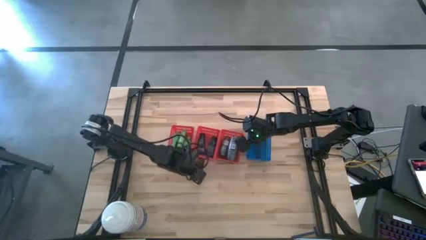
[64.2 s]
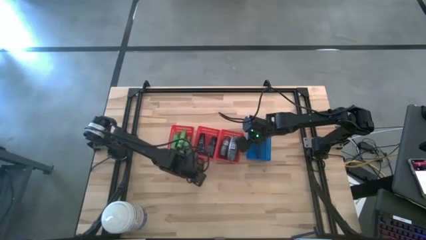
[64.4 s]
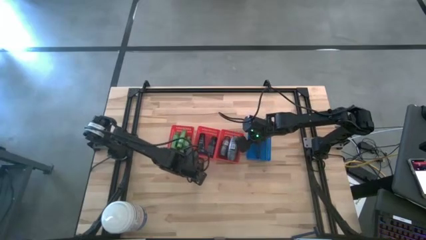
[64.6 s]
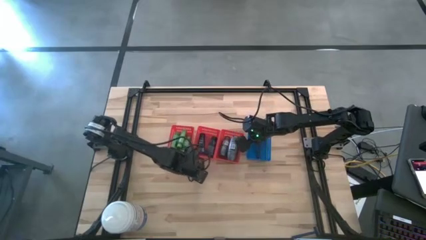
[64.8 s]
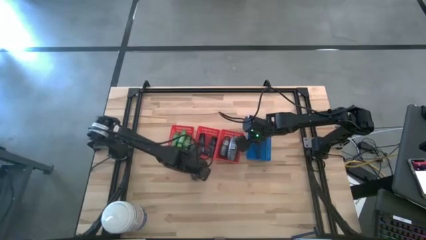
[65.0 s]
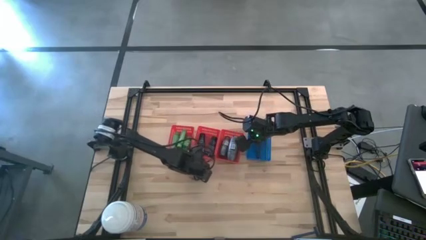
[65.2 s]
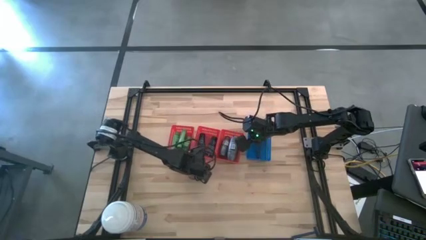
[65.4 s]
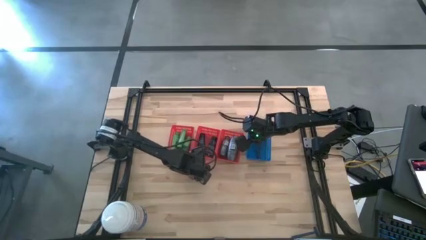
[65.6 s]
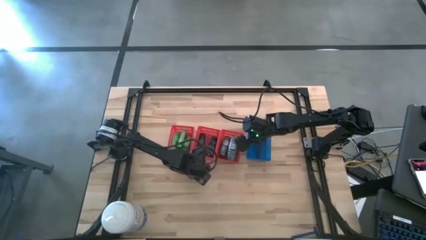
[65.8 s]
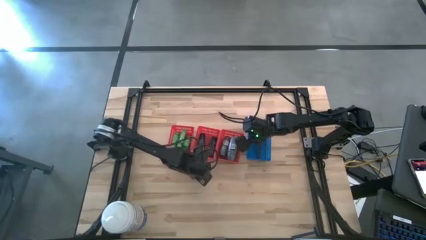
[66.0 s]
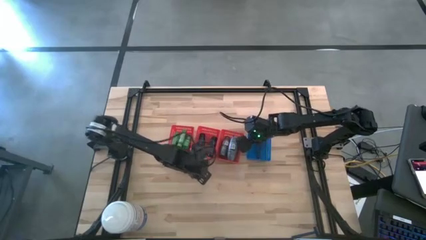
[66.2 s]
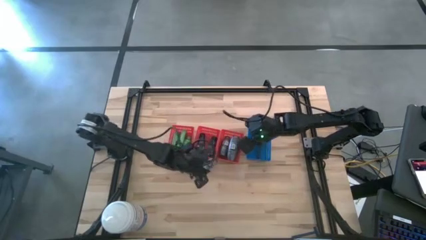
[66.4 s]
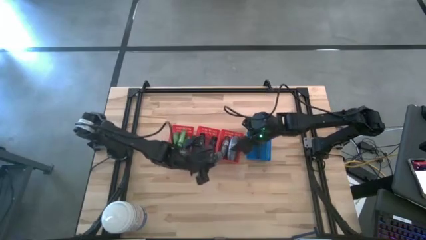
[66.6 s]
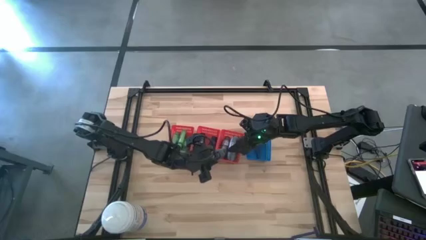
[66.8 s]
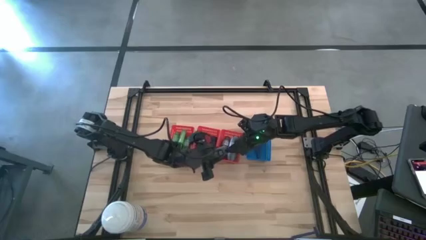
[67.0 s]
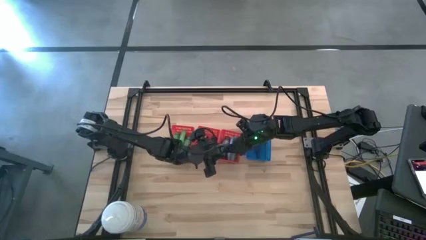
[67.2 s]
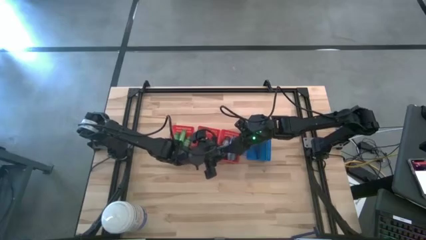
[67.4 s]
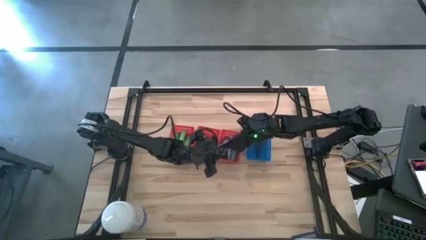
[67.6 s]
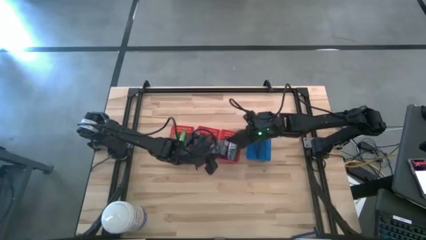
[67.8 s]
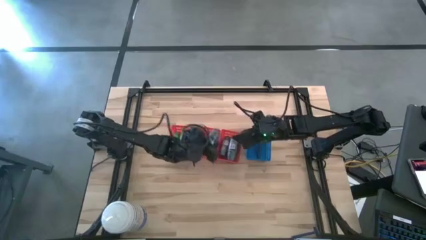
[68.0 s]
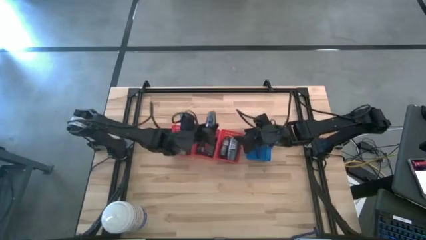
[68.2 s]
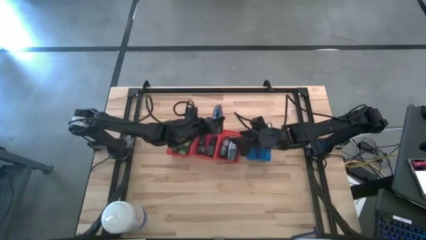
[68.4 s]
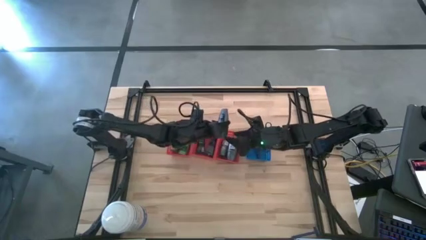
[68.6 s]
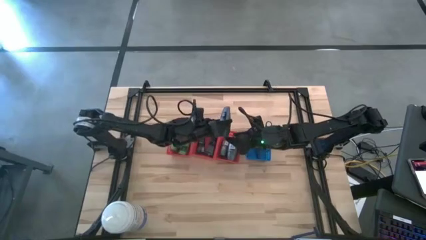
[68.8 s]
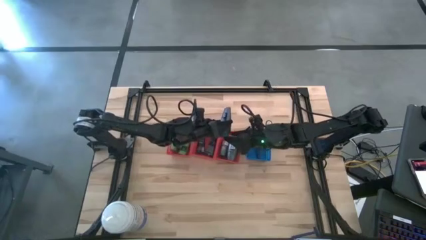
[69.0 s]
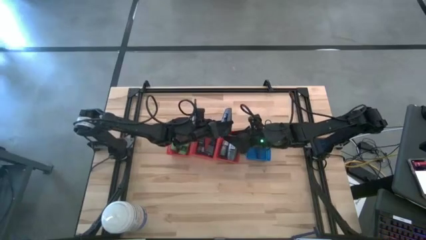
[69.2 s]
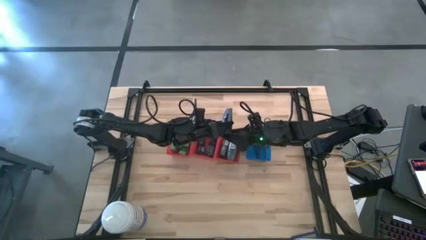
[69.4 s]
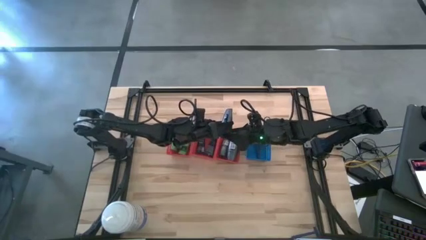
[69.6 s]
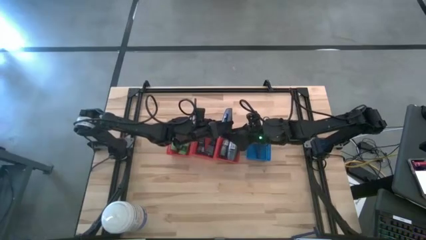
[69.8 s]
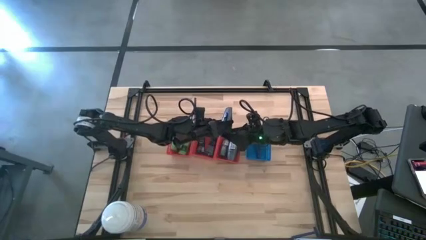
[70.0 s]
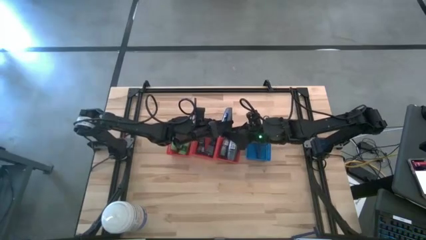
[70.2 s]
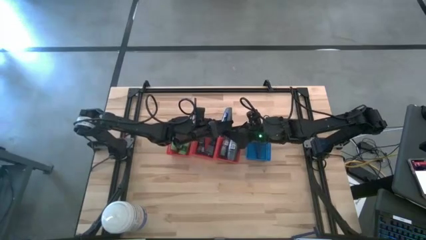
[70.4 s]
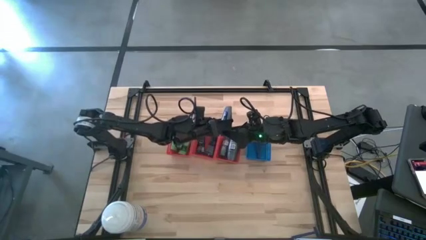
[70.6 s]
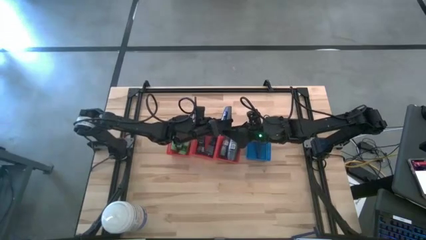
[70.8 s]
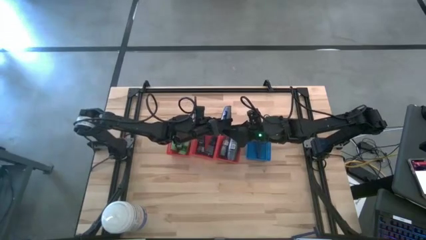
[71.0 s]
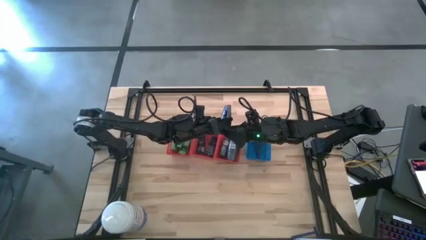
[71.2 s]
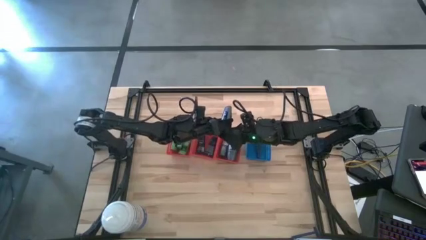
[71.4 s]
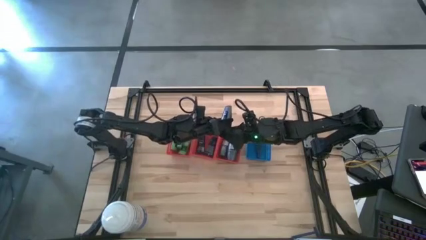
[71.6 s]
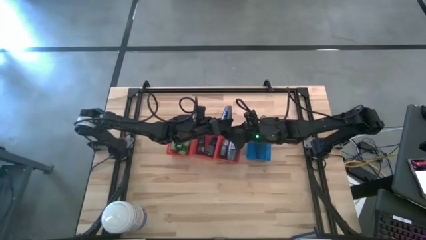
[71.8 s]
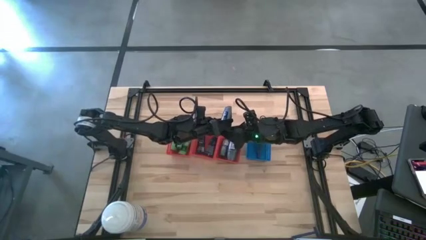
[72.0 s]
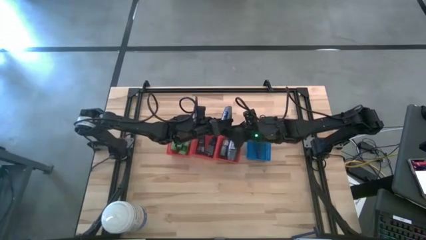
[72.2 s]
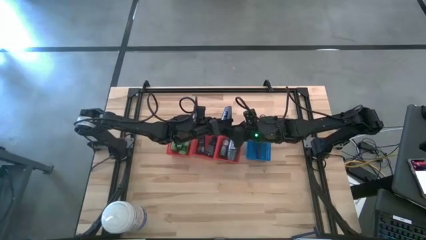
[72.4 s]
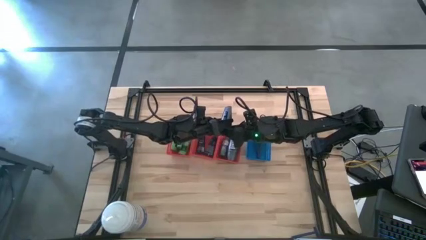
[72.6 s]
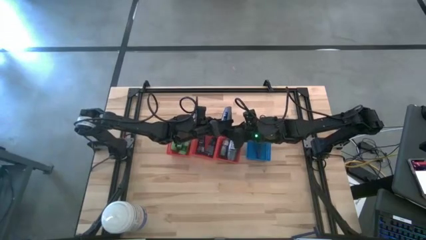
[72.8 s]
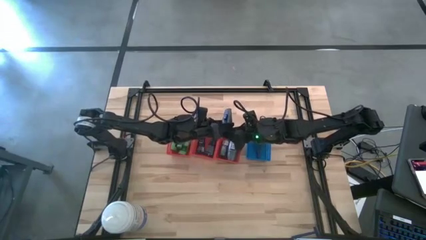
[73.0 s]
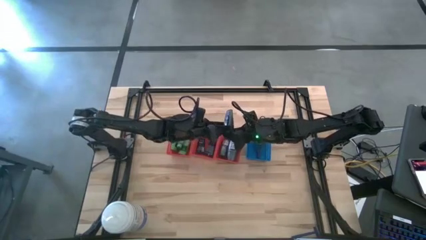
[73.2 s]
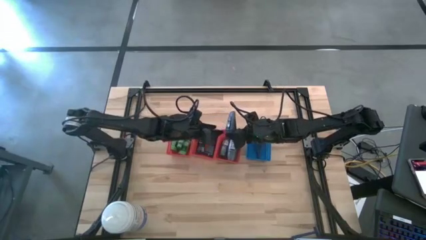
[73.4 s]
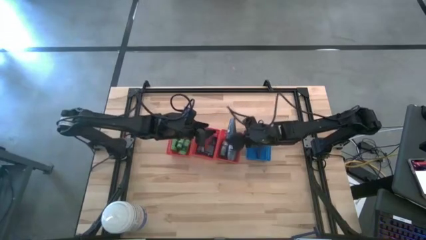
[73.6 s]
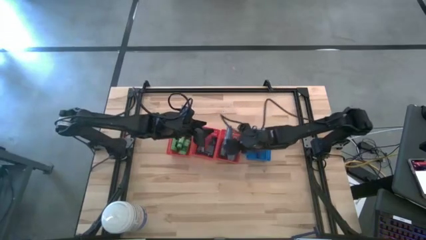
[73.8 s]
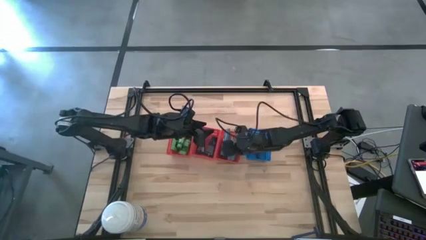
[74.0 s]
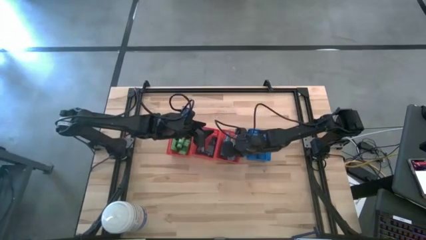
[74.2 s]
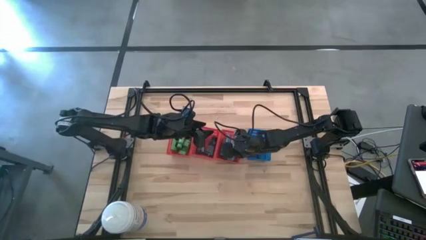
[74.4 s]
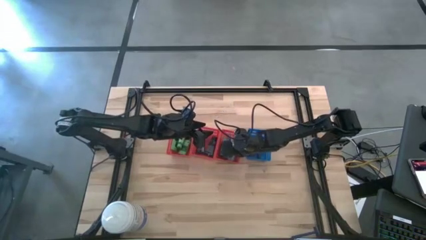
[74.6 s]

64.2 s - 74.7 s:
Task: Pick & Place Travel size toiletries
Put the deodorant into the right red bin

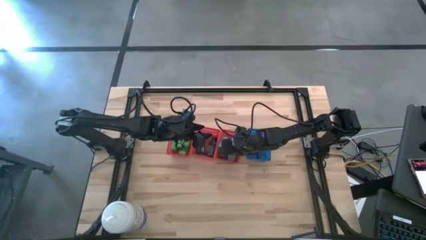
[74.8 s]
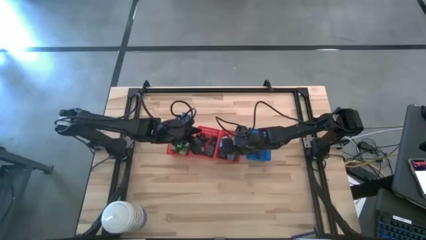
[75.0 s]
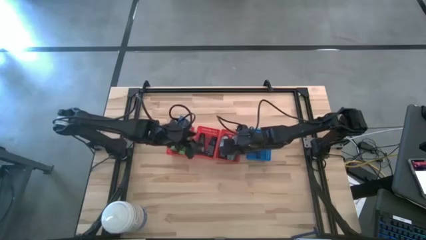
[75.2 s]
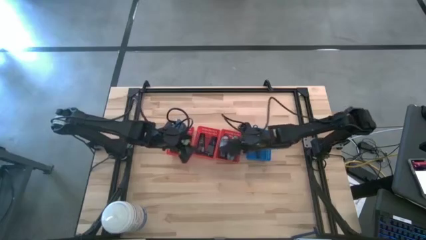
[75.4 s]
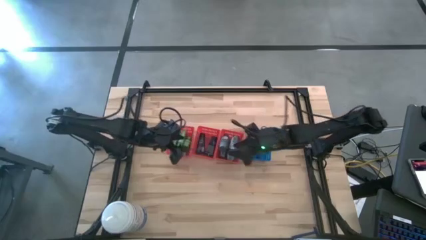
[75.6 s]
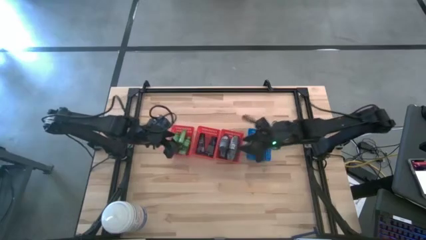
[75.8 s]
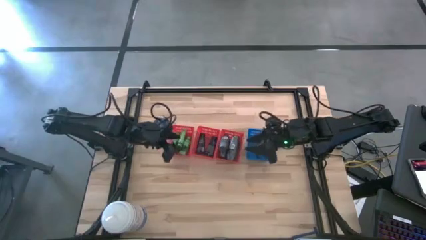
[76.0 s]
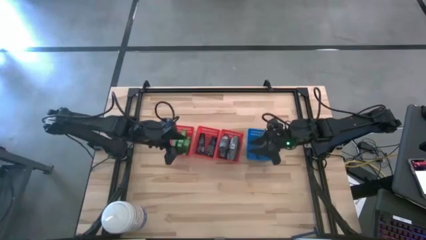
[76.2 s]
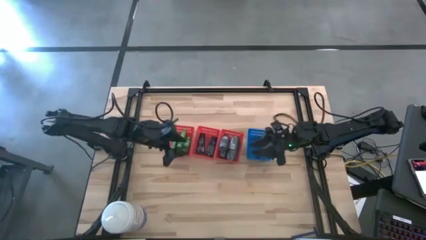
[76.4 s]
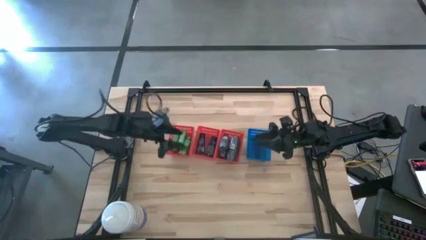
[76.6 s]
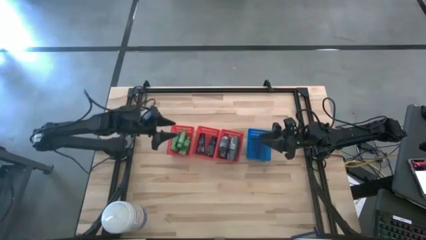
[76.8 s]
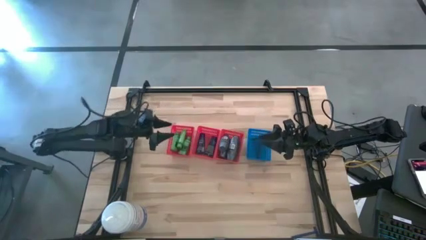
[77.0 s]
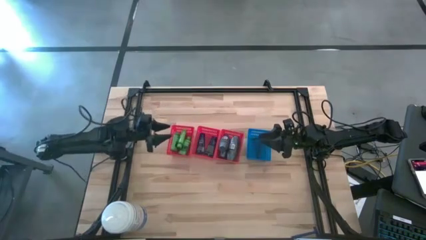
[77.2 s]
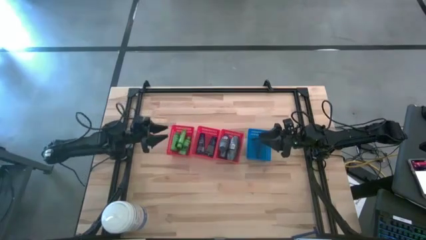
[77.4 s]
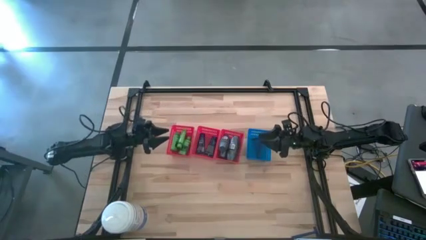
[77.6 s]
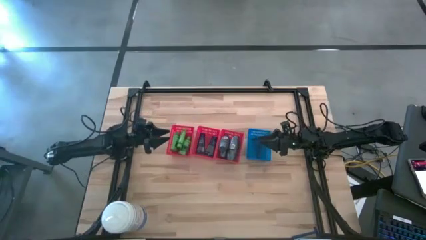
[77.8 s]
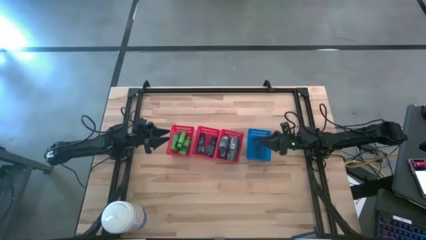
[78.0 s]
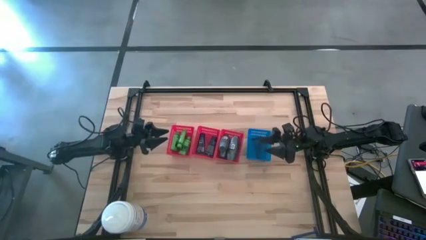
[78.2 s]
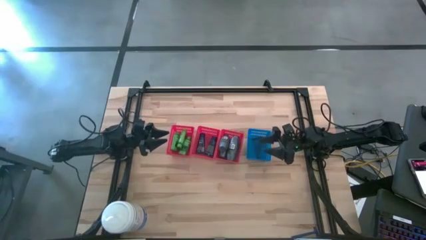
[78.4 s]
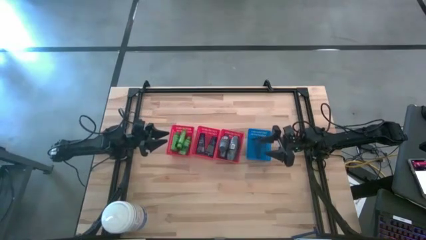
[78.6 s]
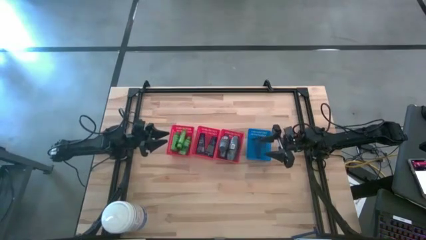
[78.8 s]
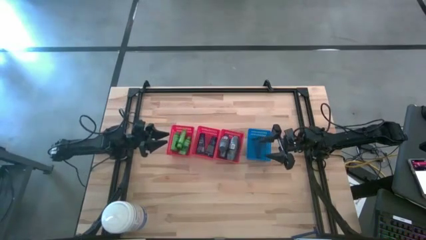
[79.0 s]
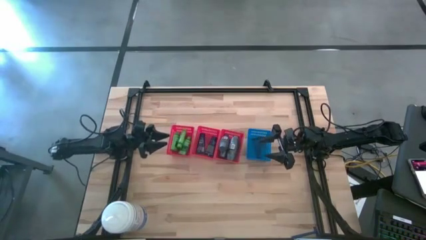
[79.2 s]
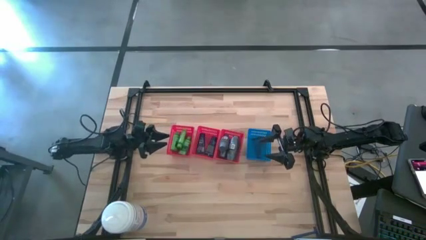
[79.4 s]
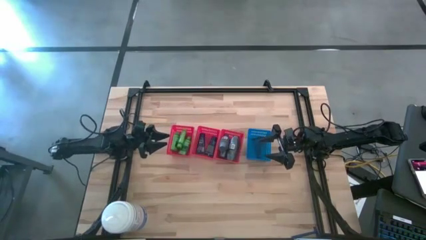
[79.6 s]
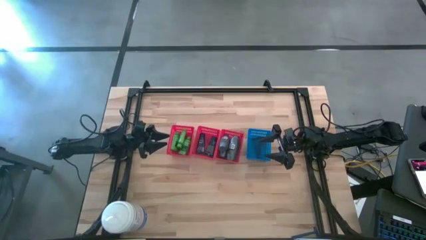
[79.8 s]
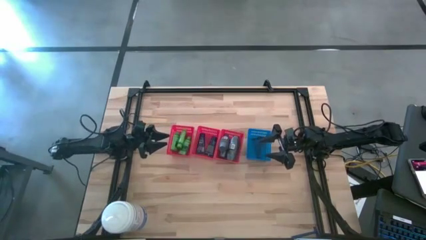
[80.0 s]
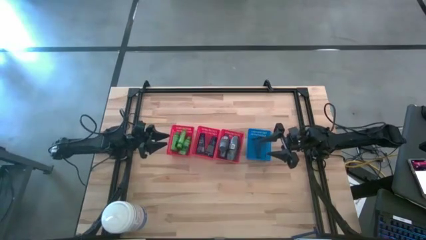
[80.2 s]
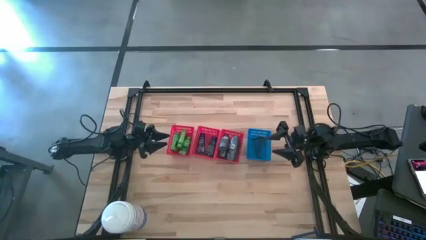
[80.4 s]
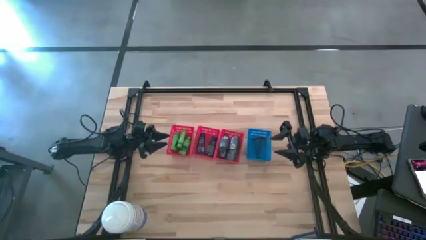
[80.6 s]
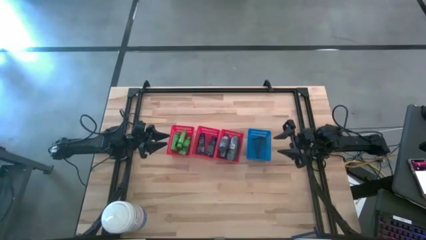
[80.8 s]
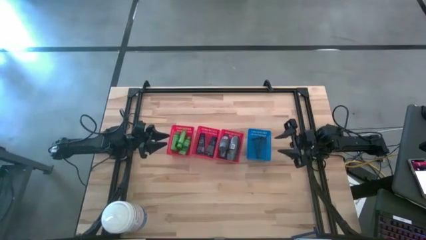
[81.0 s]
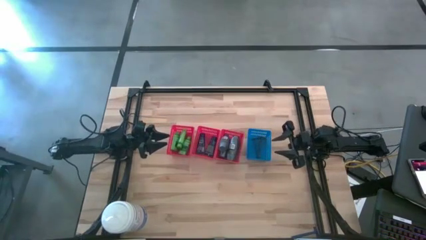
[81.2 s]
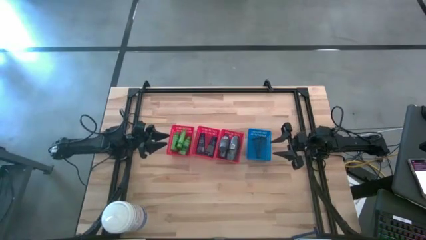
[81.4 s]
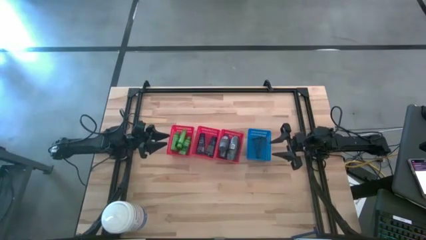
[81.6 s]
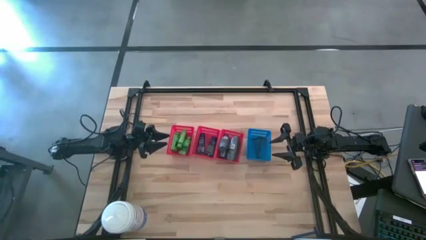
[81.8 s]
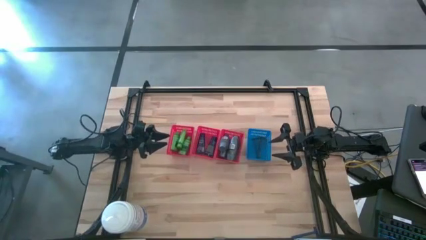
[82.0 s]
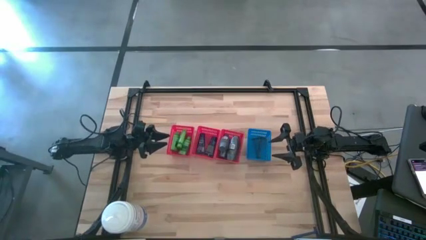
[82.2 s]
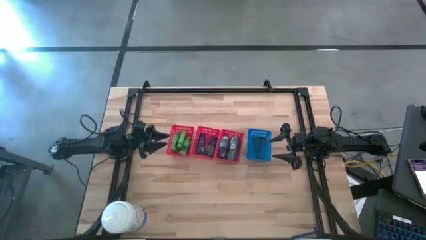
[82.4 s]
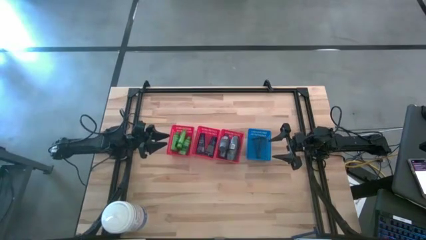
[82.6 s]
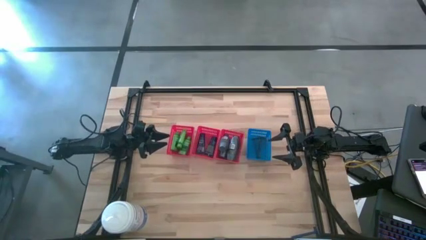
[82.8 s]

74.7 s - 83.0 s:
Return to Home Position
